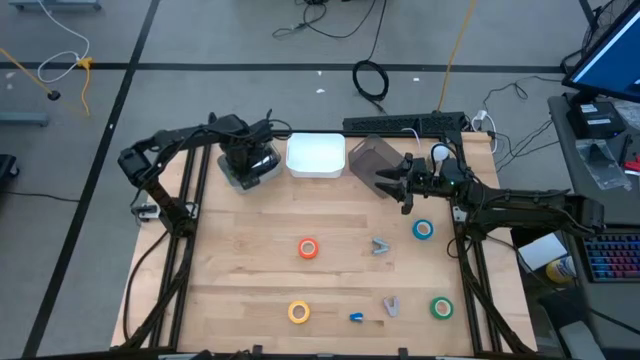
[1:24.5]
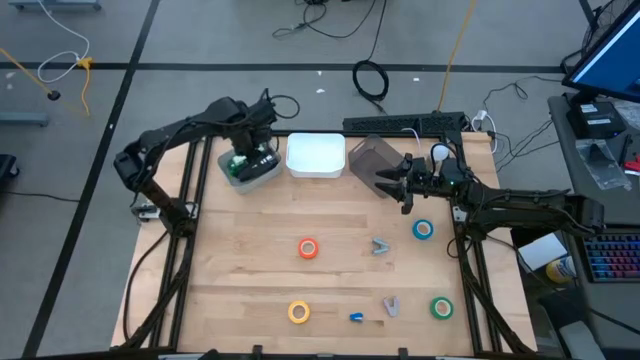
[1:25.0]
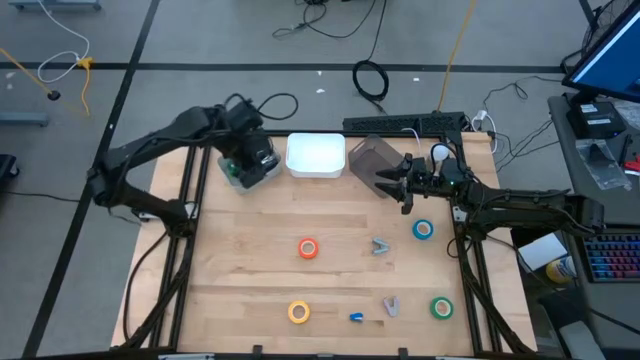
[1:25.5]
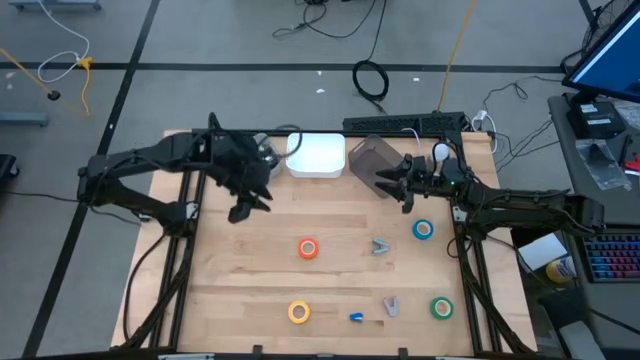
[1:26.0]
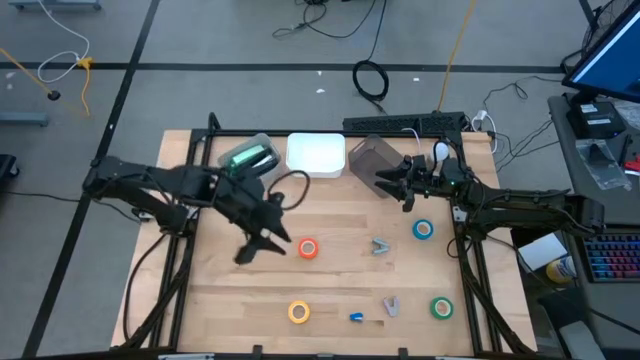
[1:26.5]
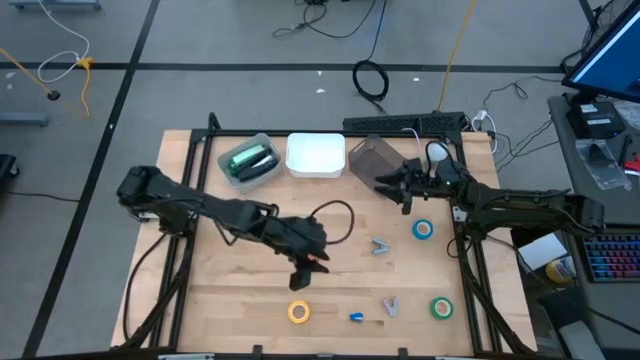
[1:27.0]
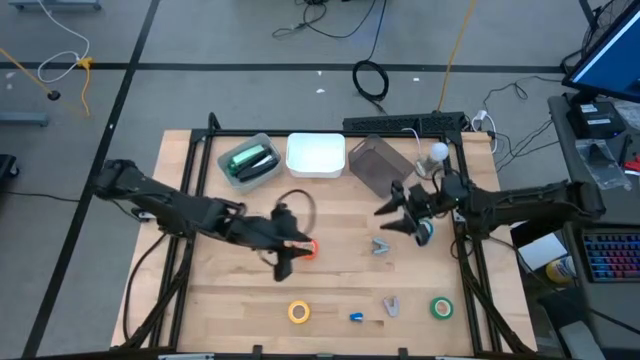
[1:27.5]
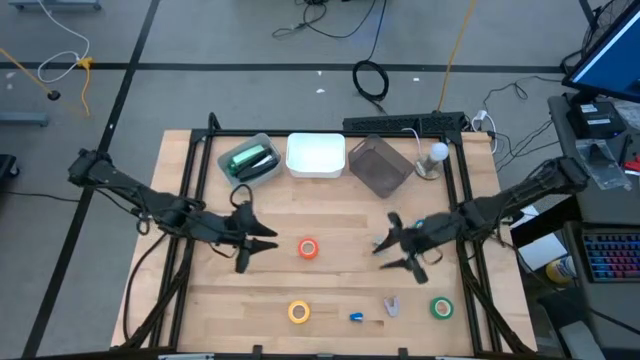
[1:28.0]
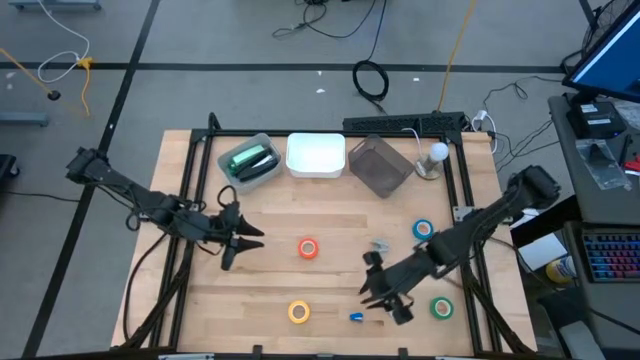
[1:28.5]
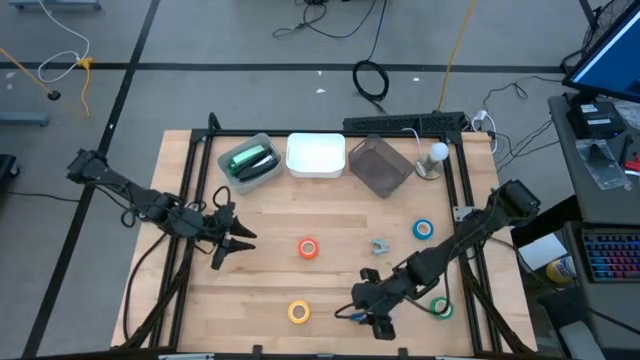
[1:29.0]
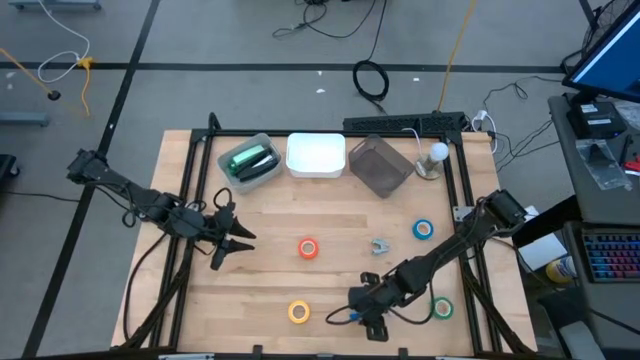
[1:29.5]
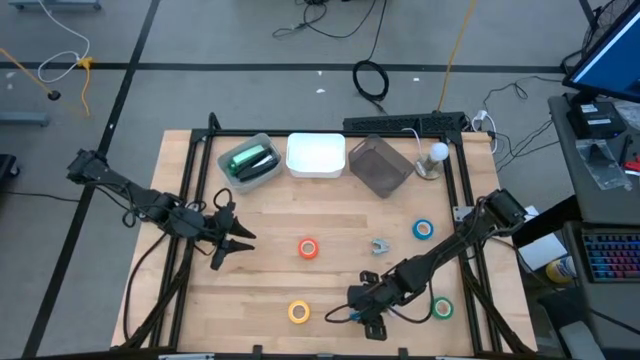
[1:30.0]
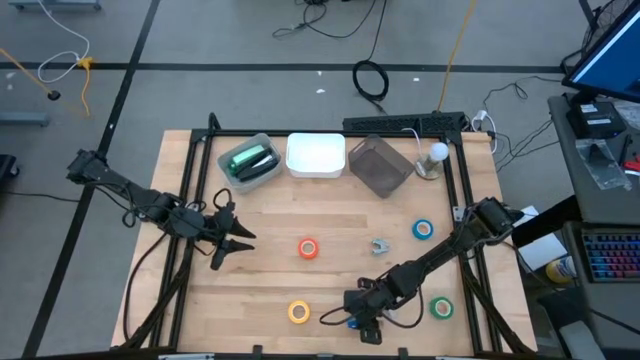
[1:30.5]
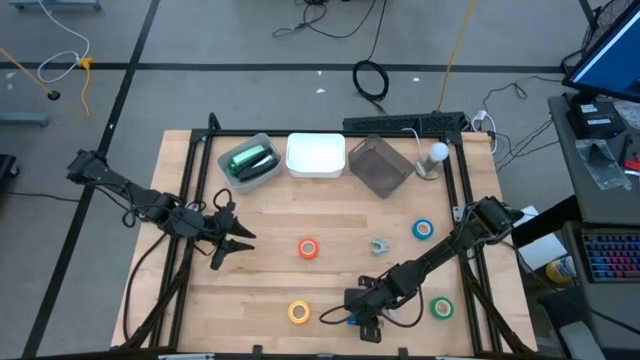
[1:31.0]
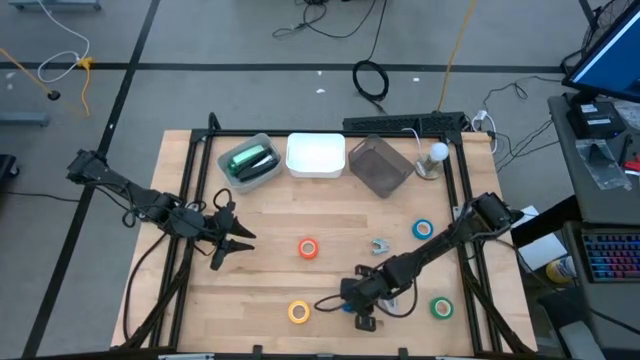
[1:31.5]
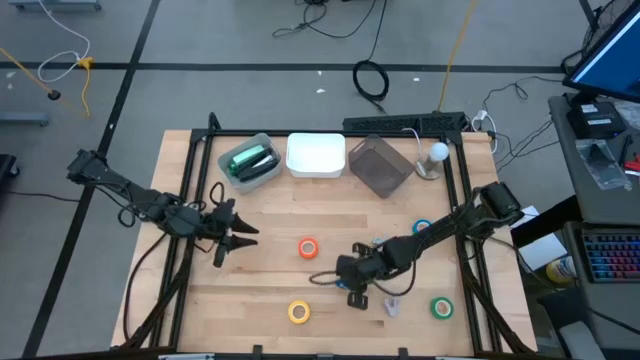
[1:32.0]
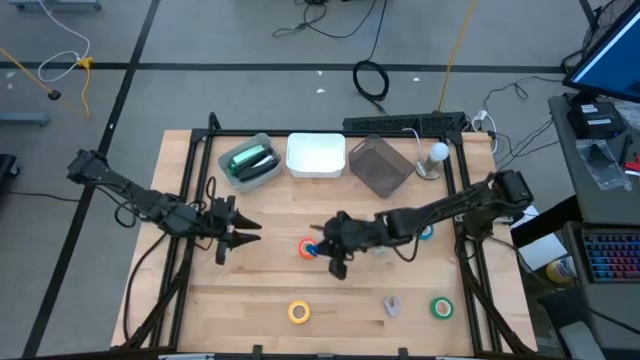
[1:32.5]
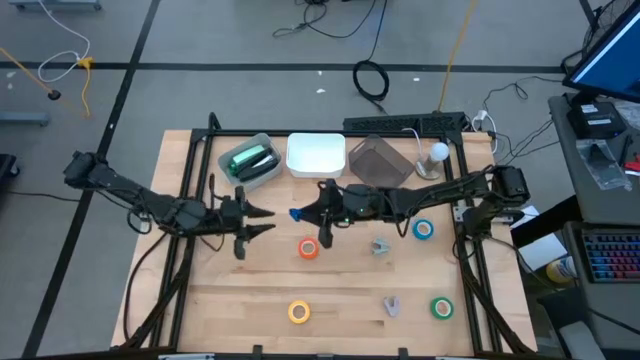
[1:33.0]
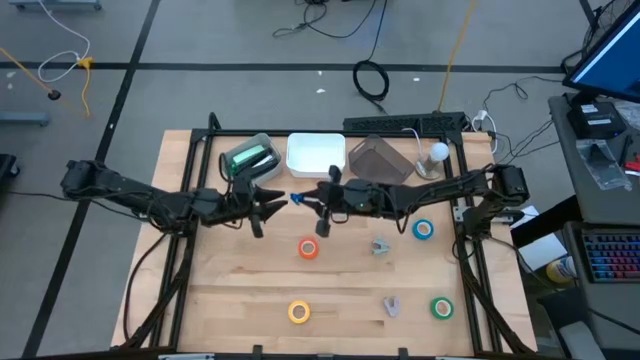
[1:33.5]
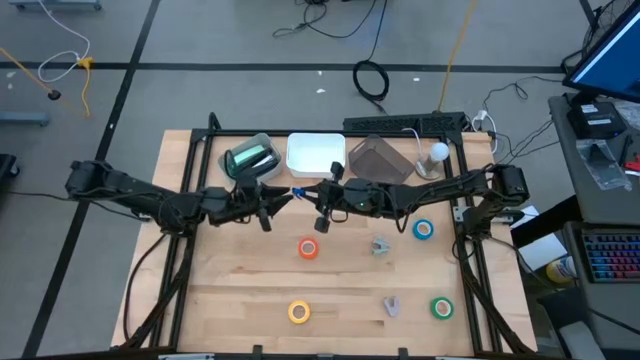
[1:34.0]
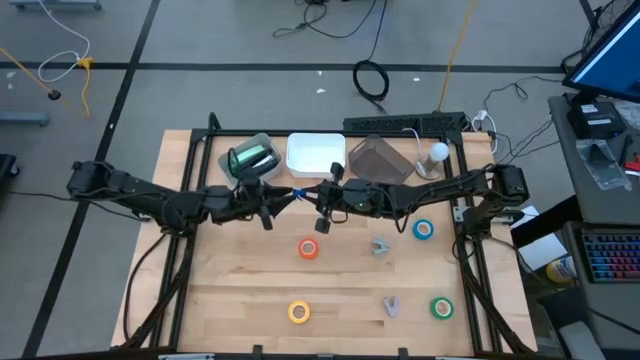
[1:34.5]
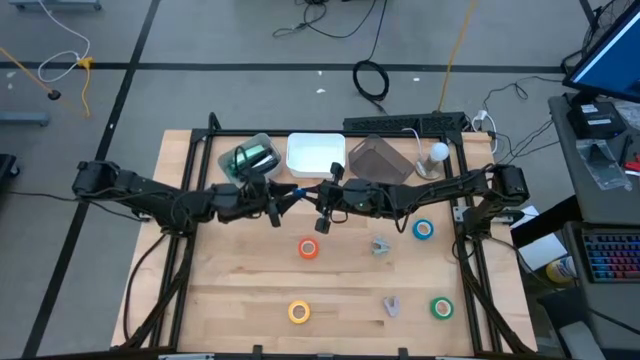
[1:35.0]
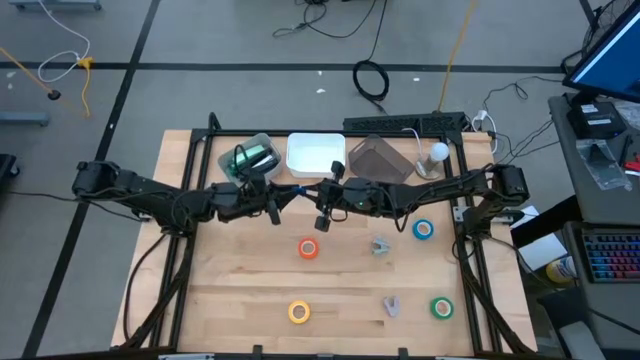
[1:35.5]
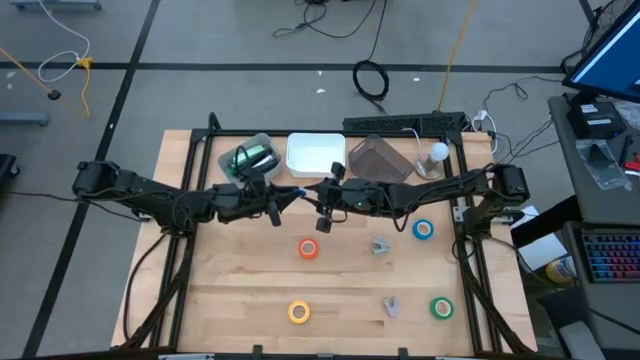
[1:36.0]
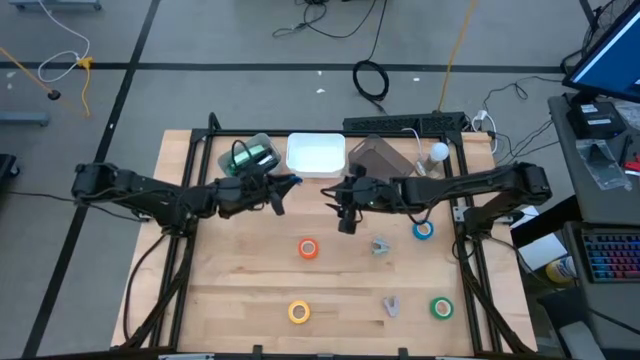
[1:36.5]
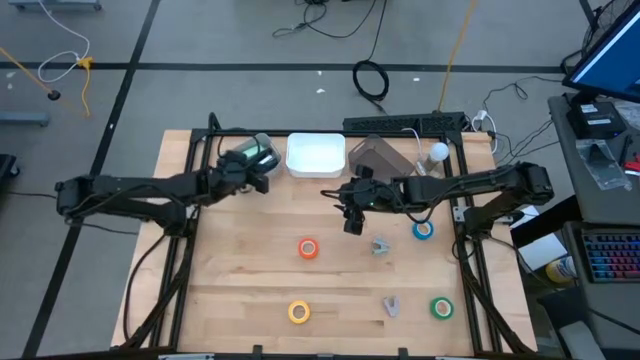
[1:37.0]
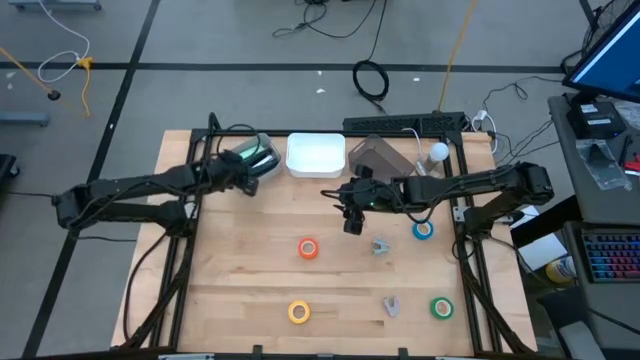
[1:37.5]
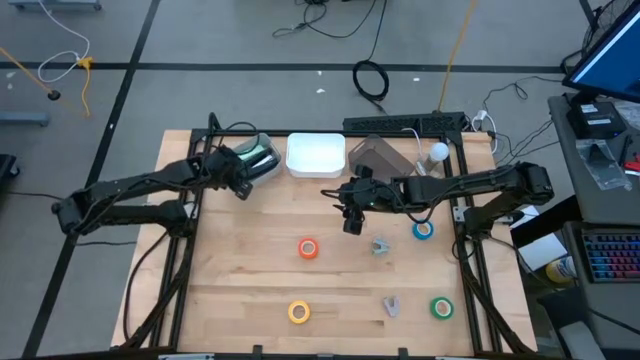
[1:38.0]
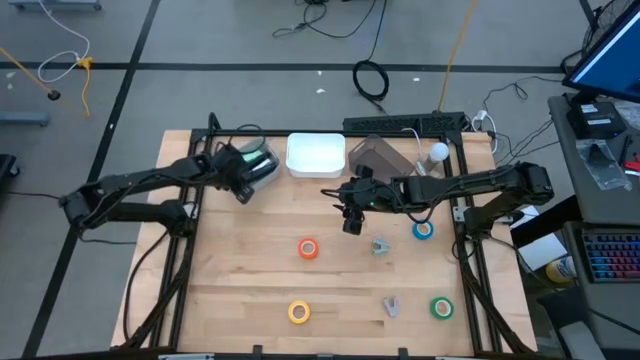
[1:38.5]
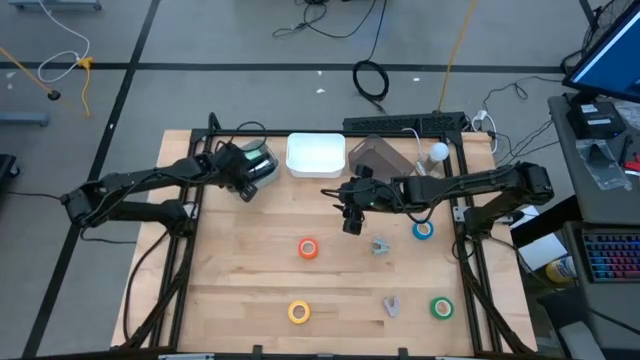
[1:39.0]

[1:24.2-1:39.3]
Task: Pick and place Stapler, Stapler remover, tape
Put the blue stapler into the gray bin

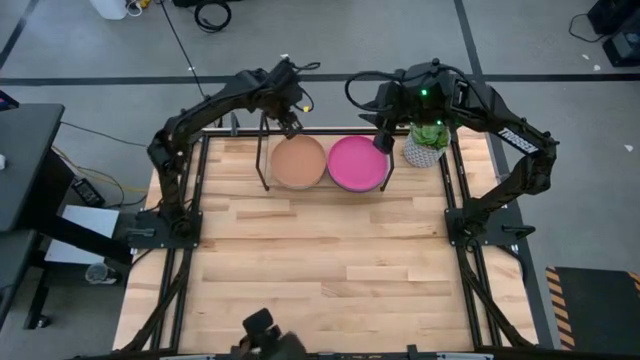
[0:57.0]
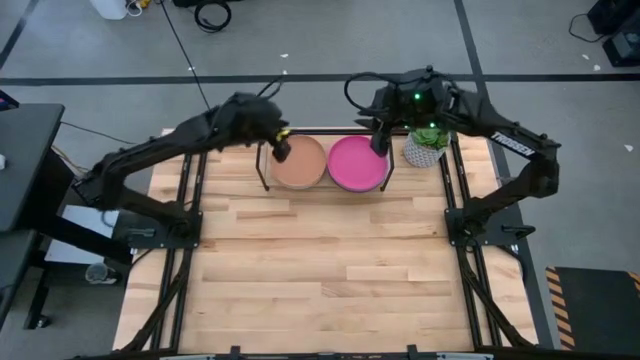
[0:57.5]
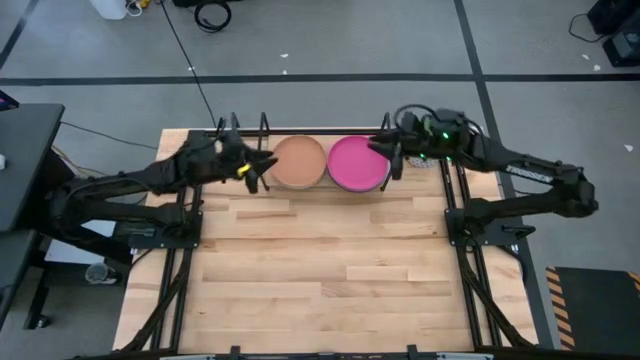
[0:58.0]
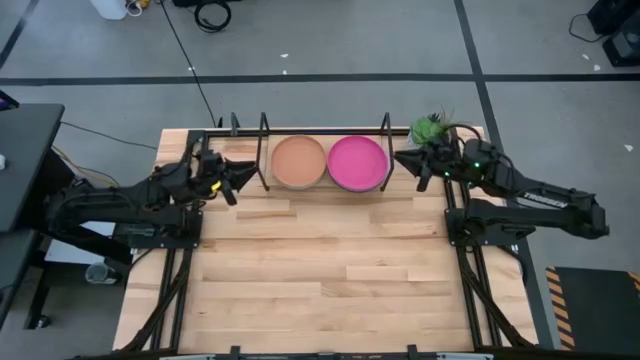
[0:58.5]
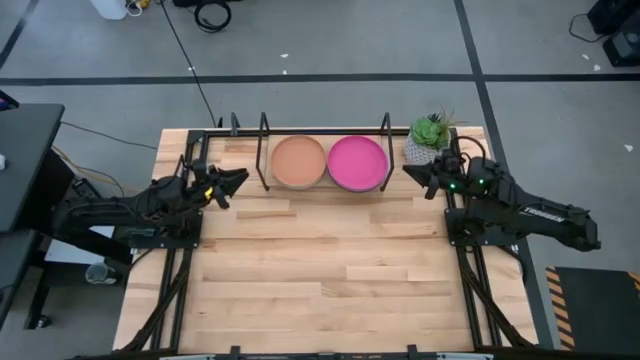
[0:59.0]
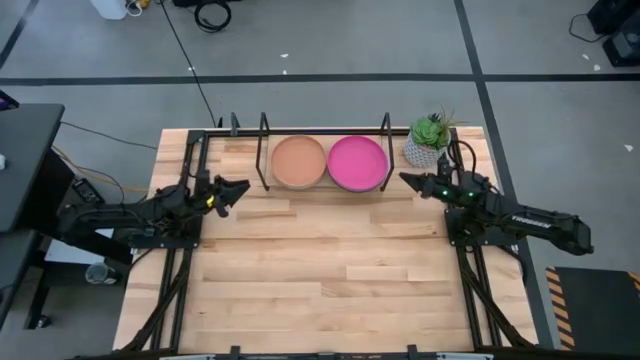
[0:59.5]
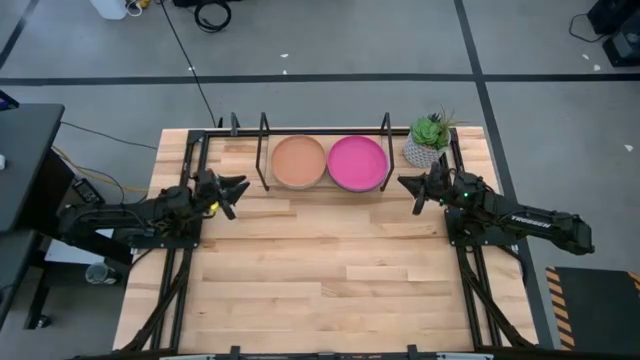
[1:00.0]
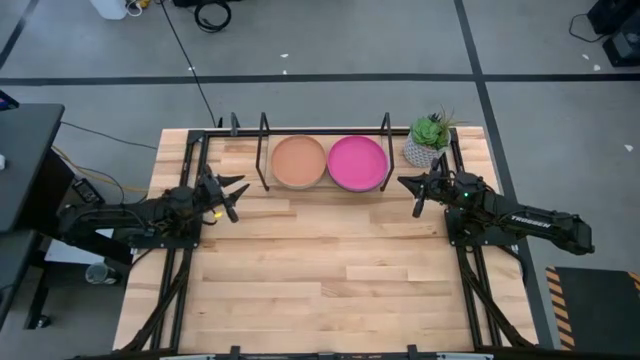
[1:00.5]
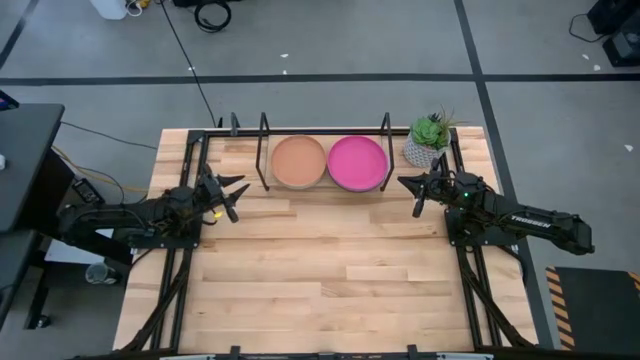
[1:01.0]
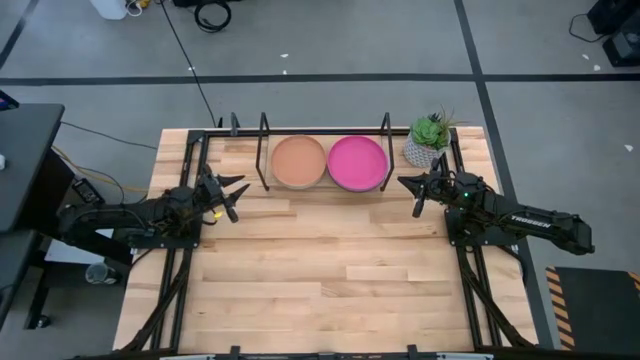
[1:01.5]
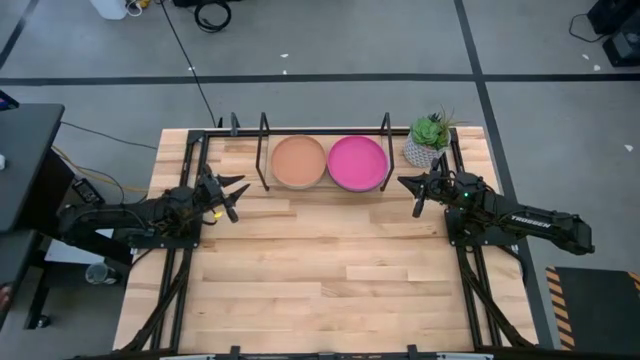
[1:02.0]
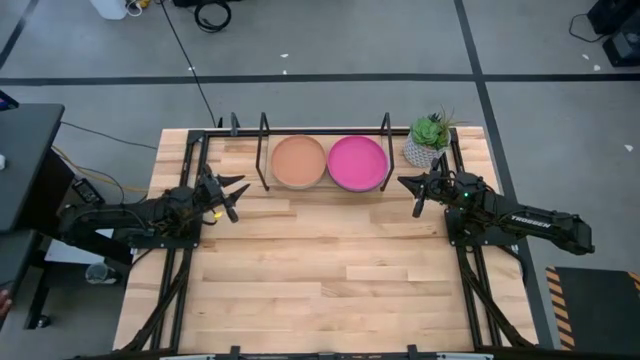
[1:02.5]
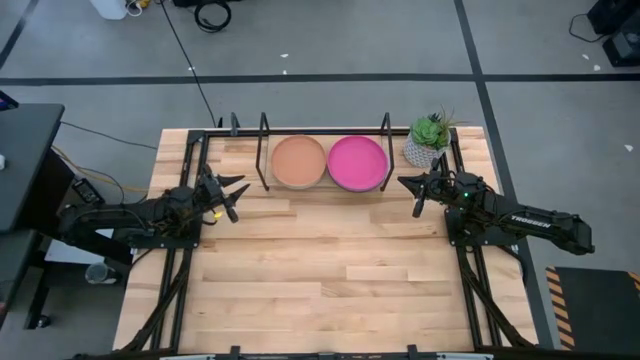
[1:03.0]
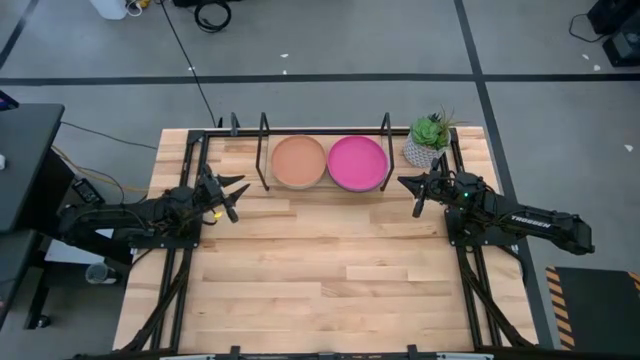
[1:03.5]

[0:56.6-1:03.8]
Task: Place and stack plates onto a shelf
Return to Home Position
